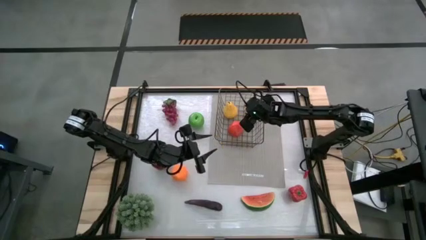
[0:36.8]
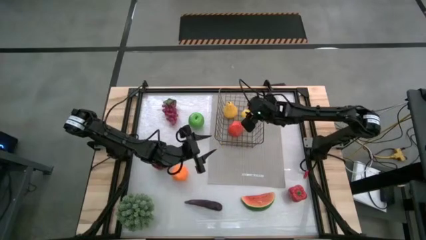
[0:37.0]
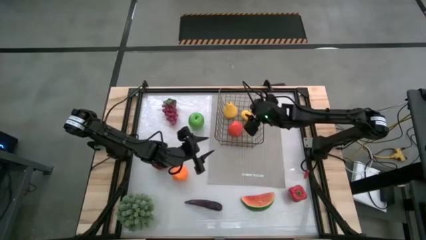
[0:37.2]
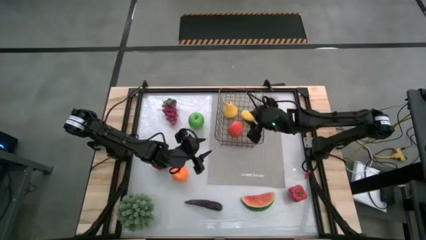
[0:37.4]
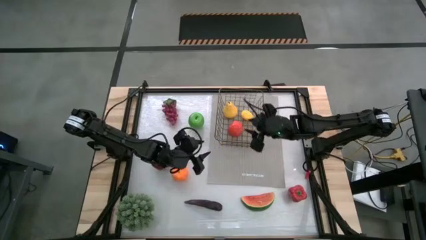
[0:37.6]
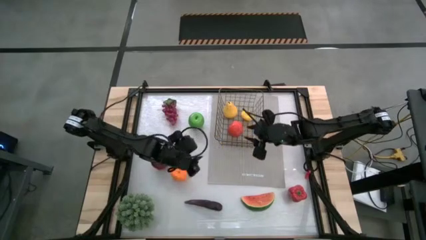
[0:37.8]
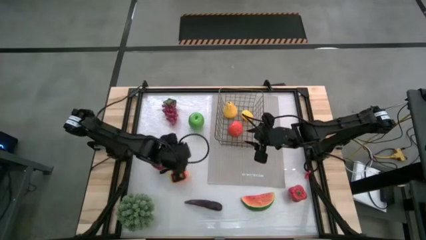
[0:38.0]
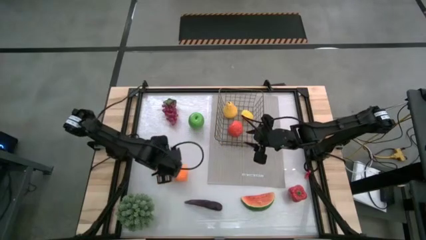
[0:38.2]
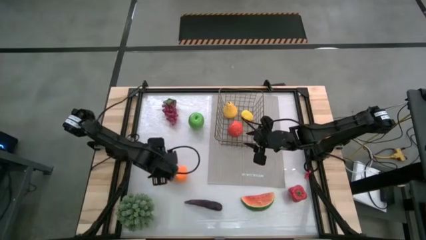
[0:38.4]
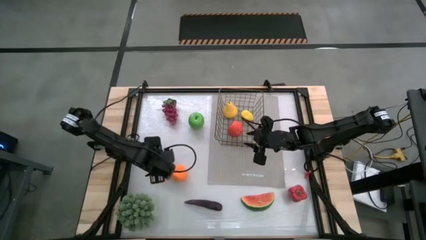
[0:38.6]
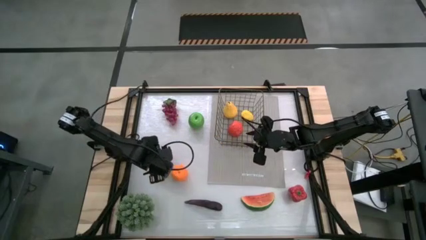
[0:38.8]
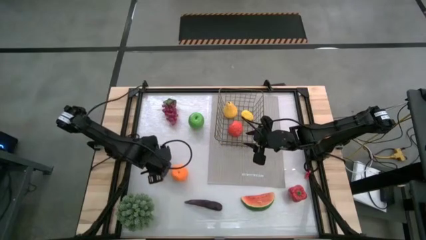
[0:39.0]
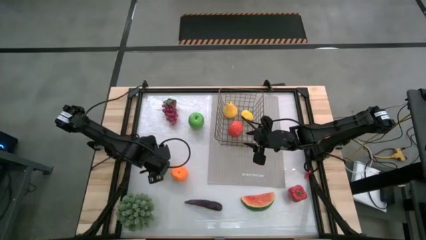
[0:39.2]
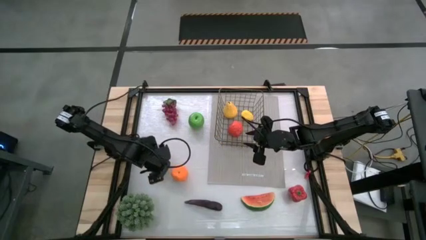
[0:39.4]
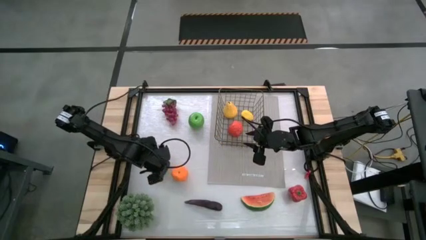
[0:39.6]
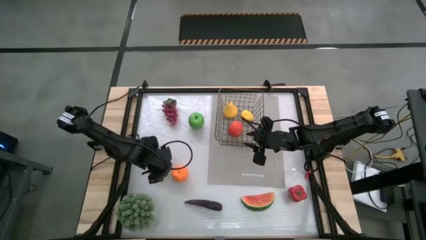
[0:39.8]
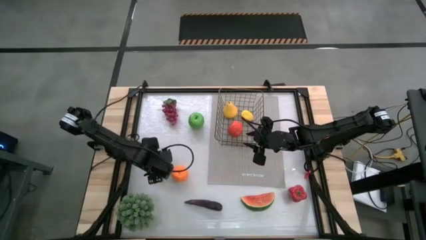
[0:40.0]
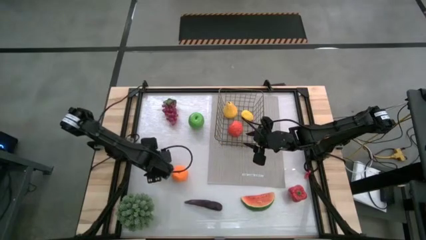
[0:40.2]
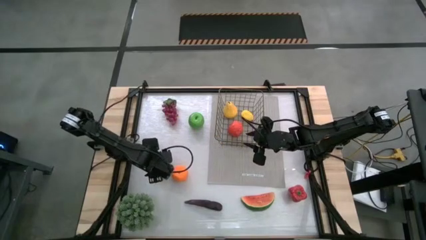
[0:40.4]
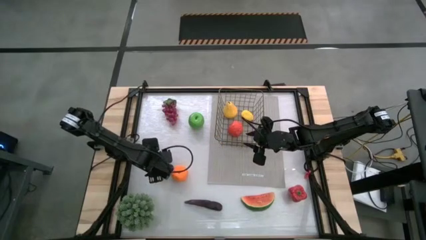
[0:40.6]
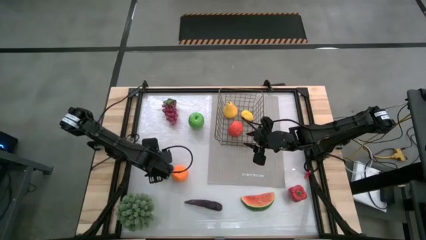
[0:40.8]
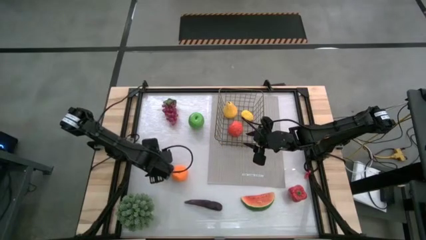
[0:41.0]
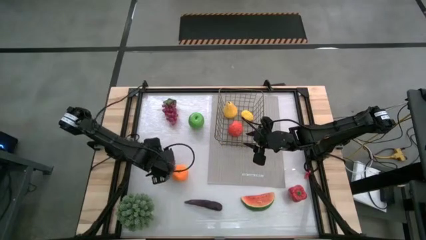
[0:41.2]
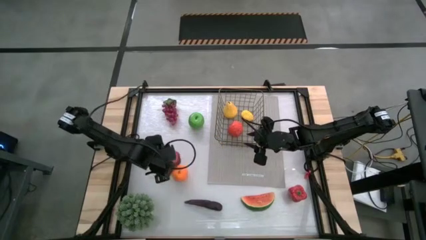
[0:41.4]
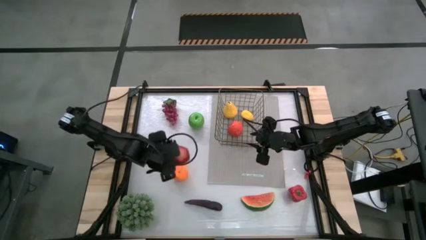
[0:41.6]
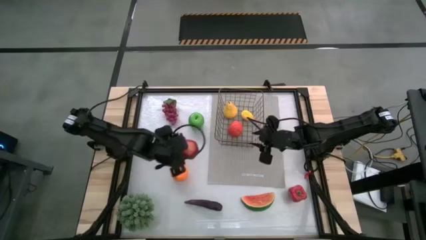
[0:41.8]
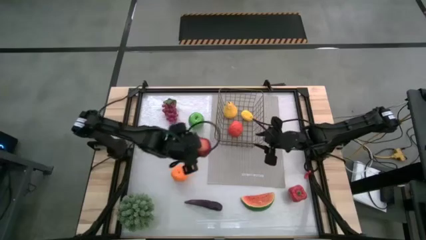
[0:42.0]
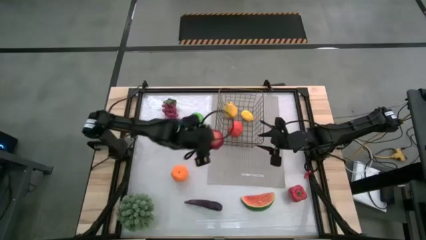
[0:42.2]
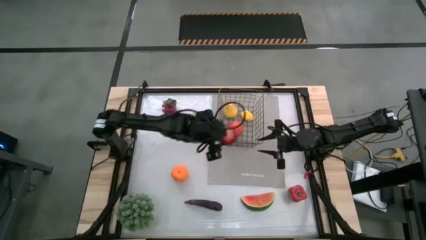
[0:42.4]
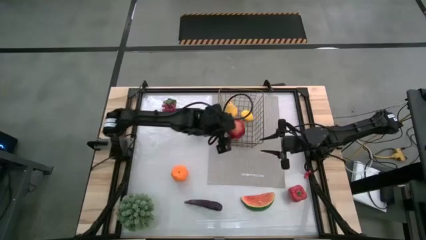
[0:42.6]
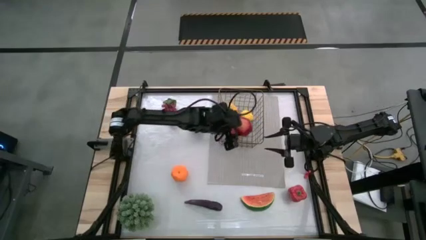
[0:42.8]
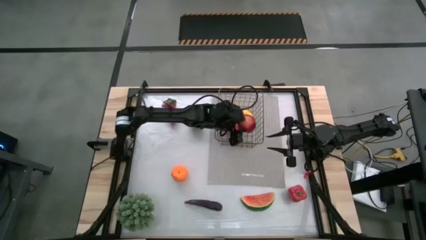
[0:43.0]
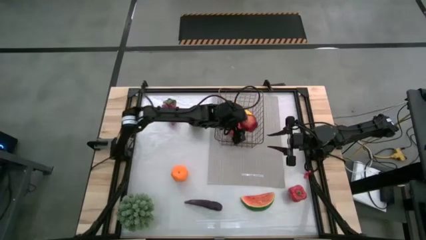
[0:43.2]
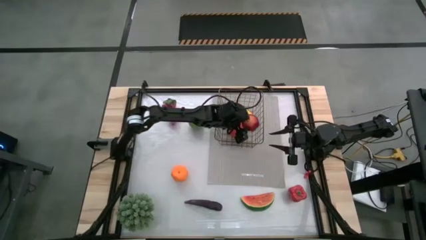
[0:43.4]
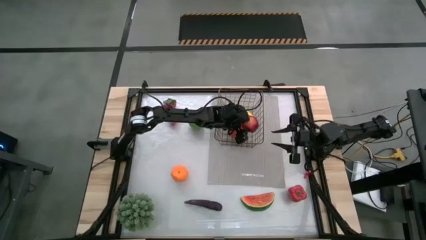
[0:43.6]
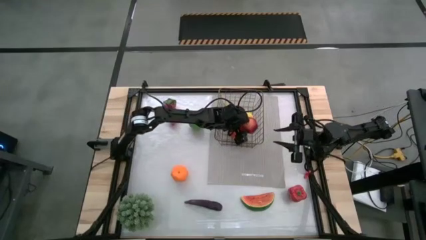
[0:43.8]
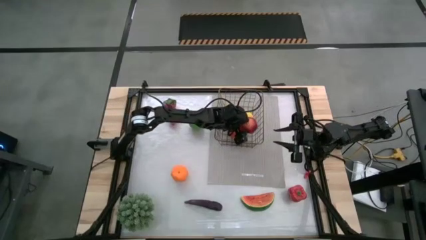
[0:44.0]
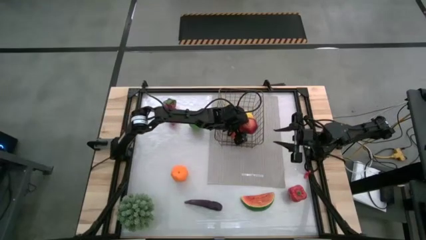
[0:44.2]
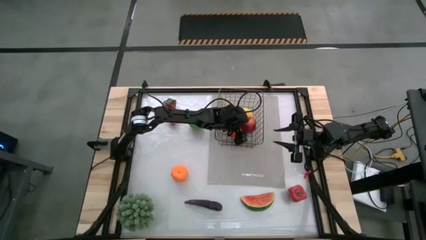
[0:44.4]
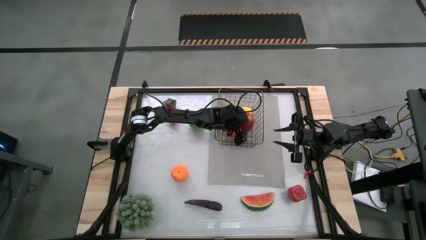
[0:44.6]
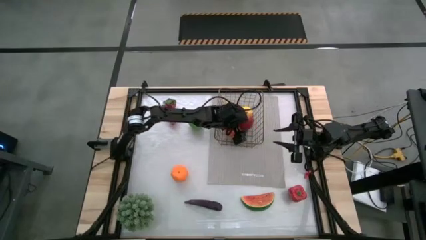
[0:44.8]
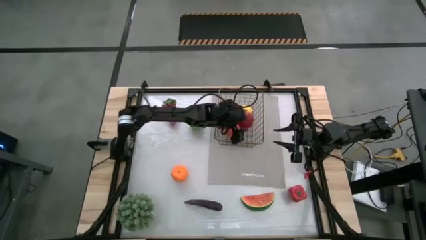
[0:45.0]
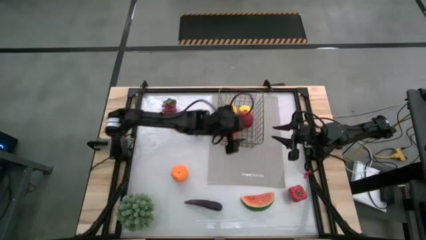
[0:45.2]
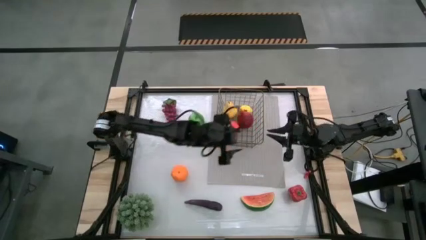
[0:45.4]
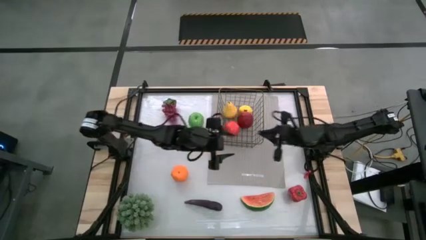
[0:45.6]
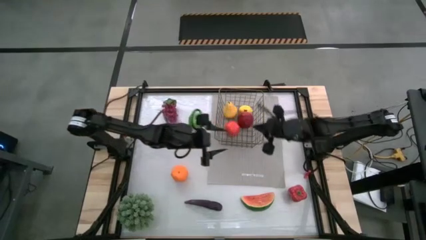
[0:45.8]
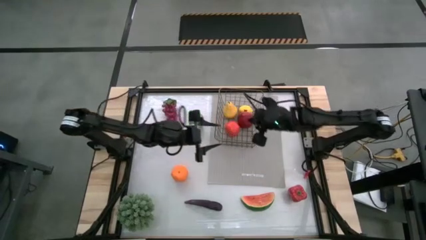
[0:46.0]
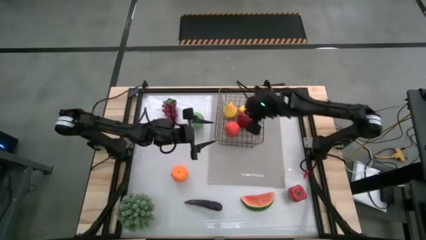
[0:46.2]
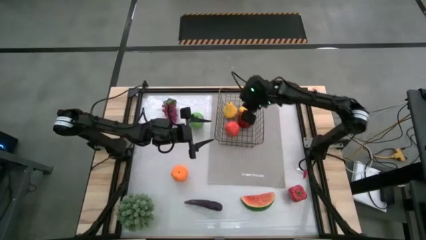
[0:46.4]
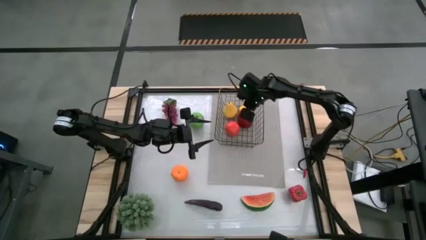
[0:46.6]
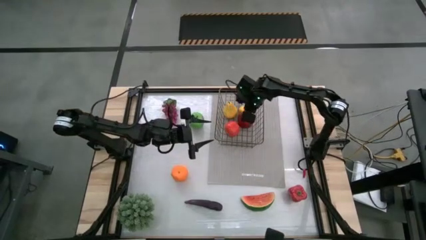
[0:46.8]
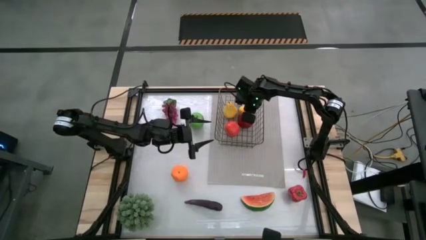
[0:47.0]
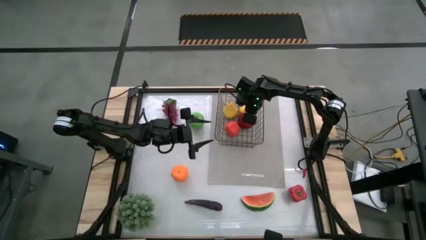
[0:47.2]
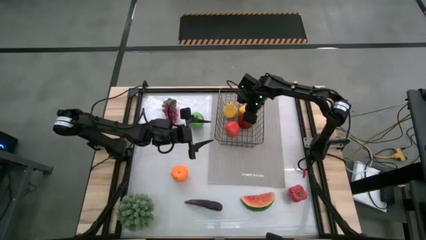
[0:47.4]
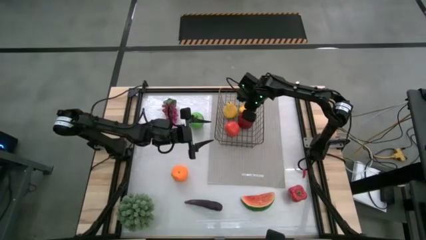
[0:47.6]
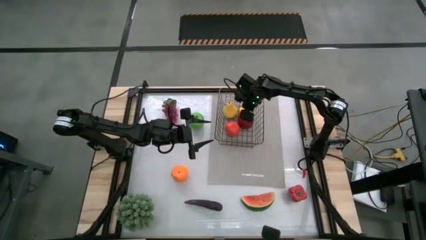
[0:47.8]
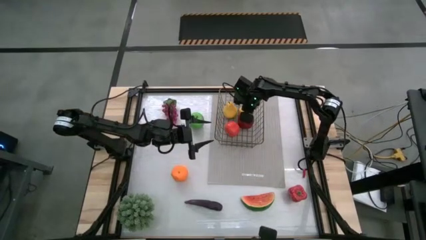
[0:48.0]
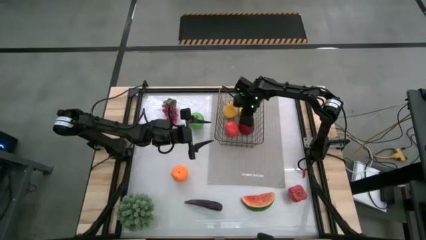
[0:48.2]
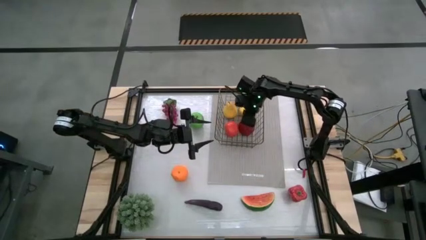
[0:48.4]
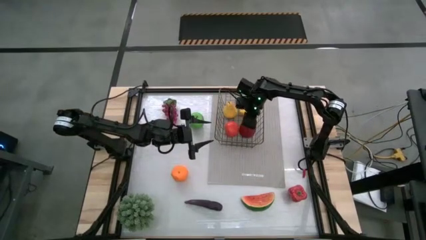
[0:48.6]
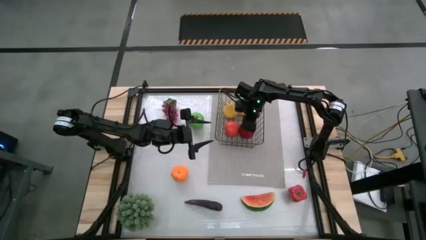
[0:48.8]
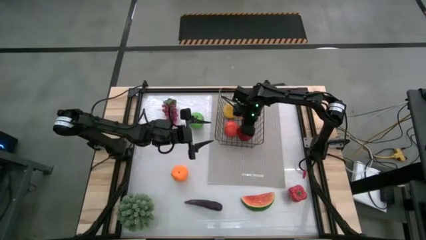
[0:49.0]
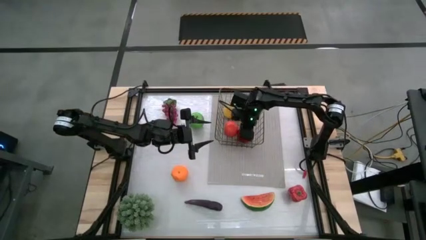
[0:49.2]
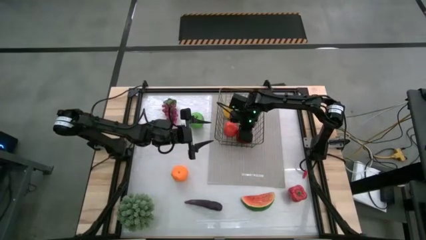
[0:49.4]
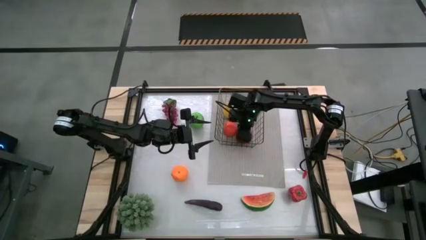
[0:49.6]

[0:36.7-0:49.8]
Task: Build produce basket
Put the pomegranate into the wire basket
